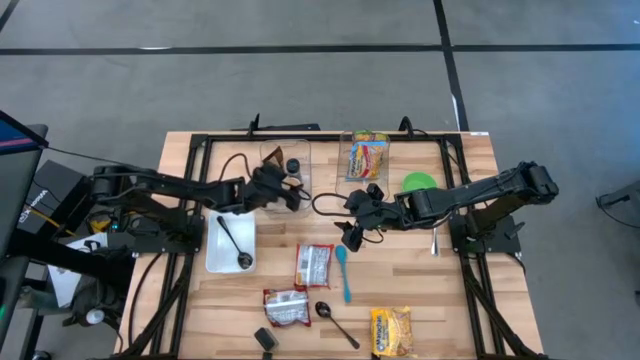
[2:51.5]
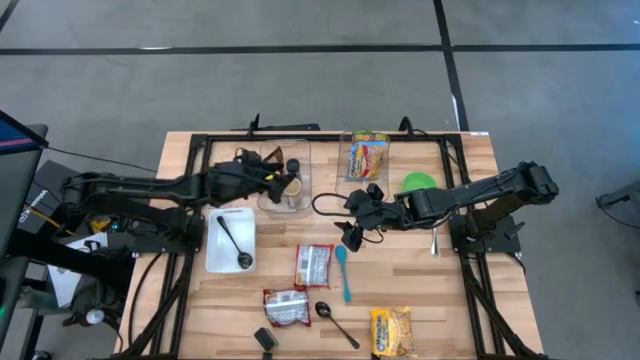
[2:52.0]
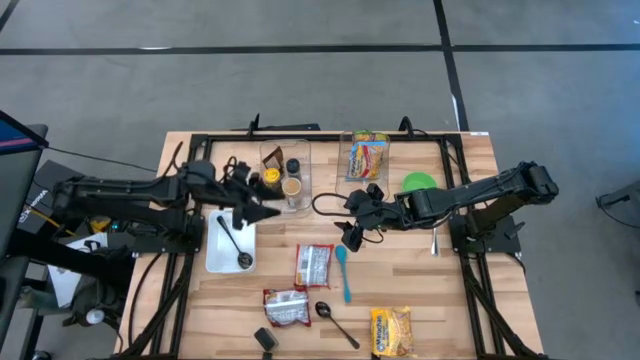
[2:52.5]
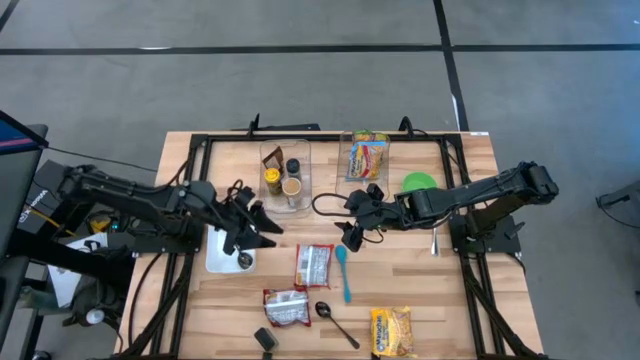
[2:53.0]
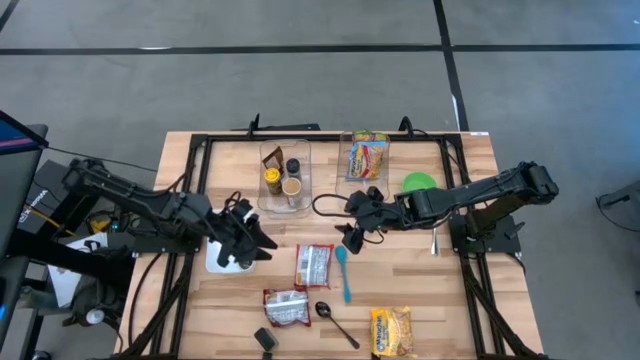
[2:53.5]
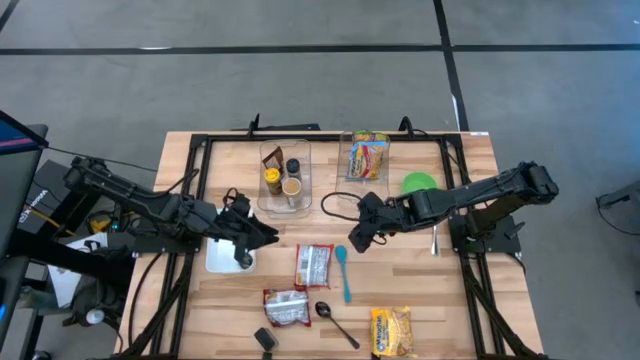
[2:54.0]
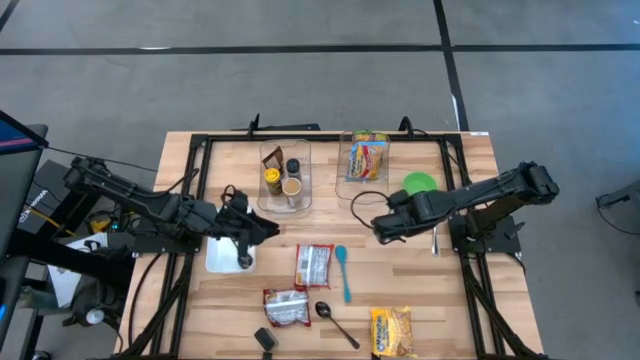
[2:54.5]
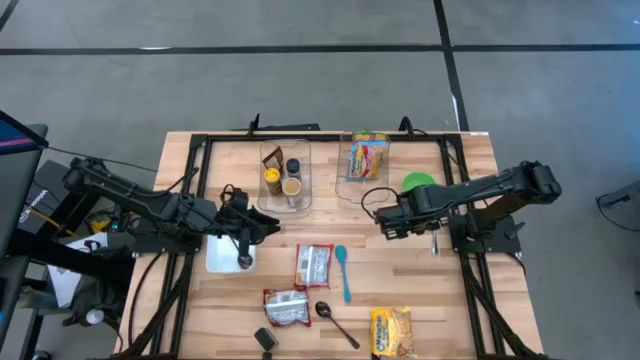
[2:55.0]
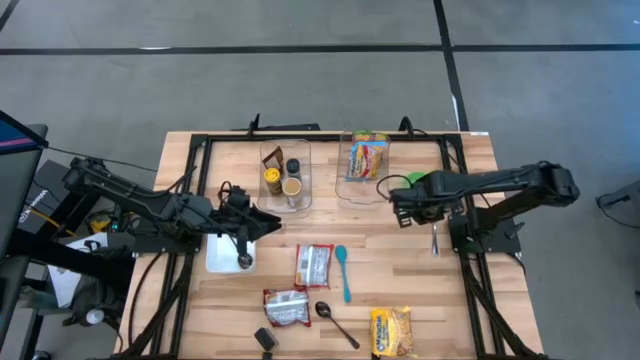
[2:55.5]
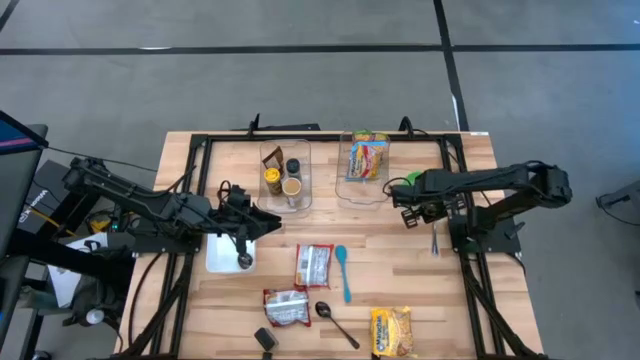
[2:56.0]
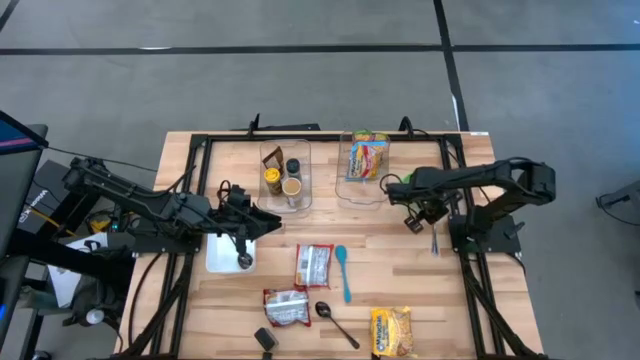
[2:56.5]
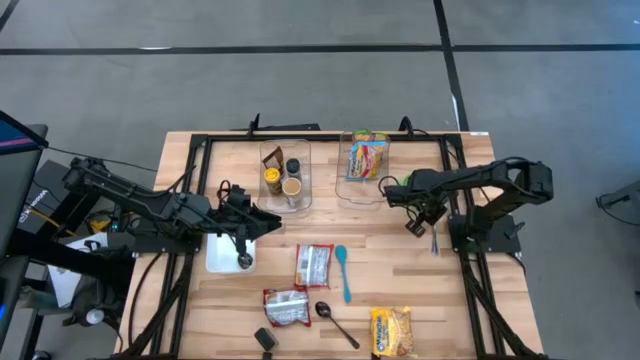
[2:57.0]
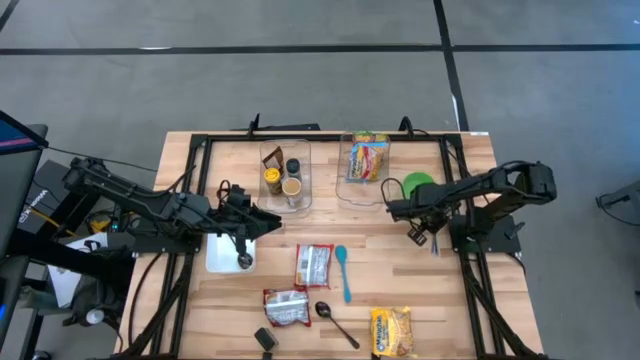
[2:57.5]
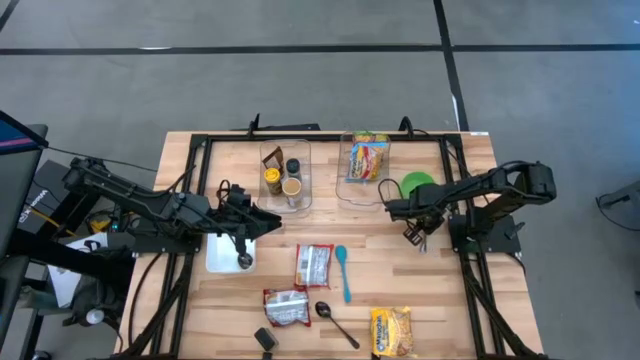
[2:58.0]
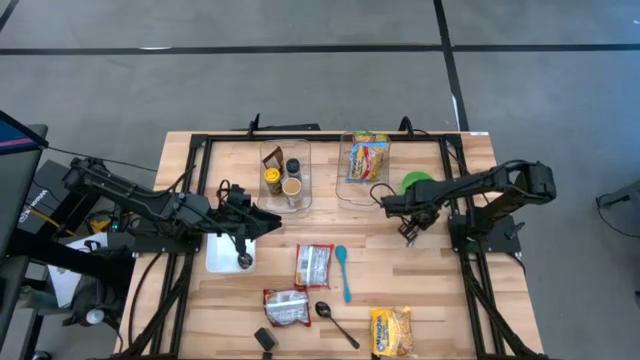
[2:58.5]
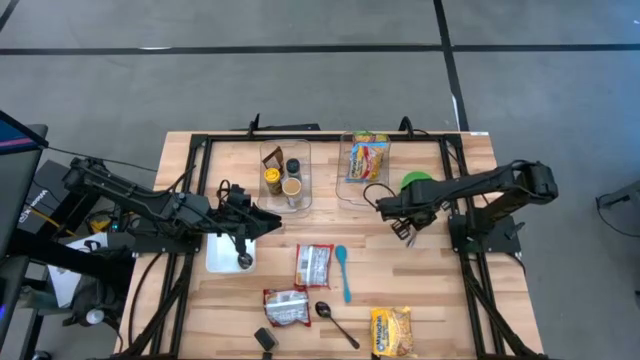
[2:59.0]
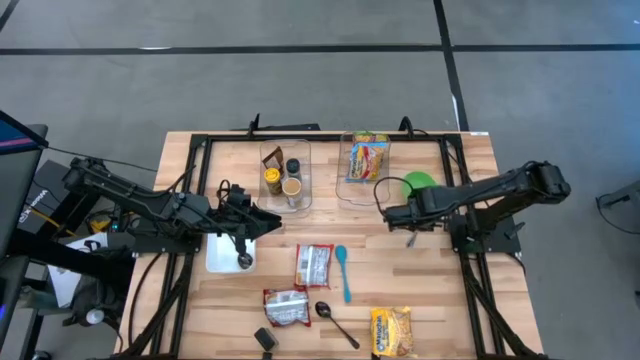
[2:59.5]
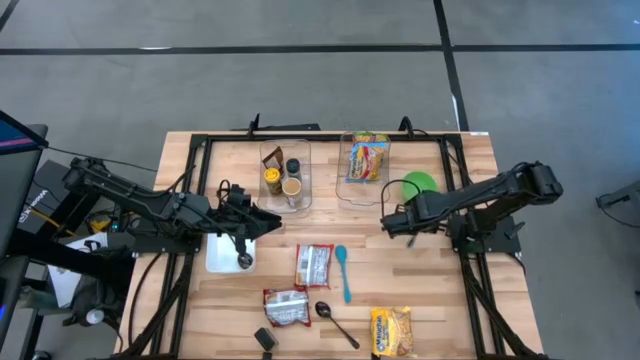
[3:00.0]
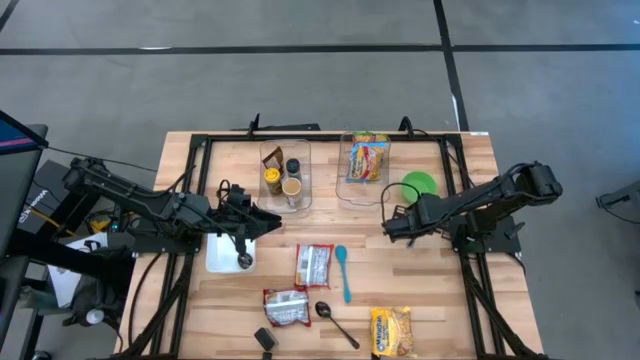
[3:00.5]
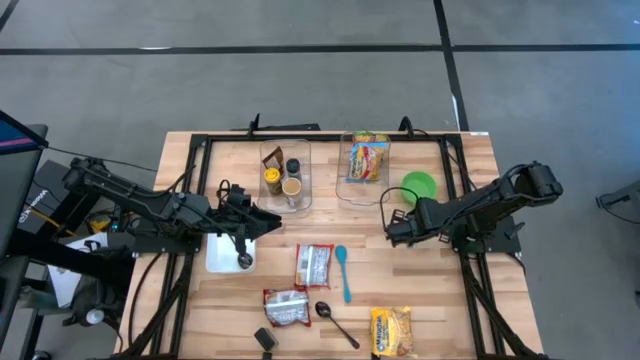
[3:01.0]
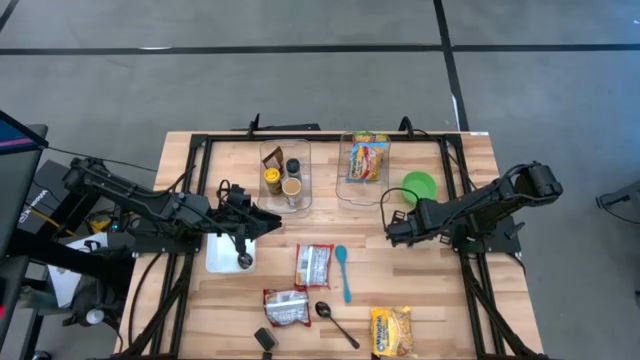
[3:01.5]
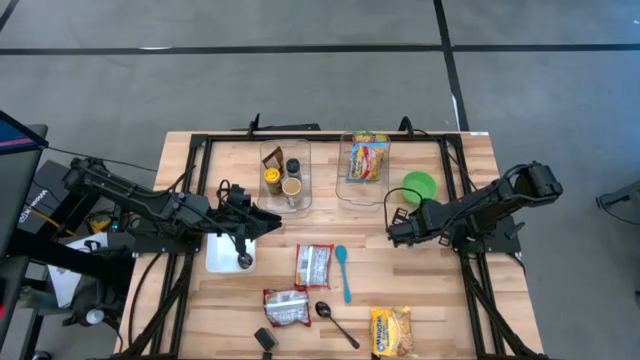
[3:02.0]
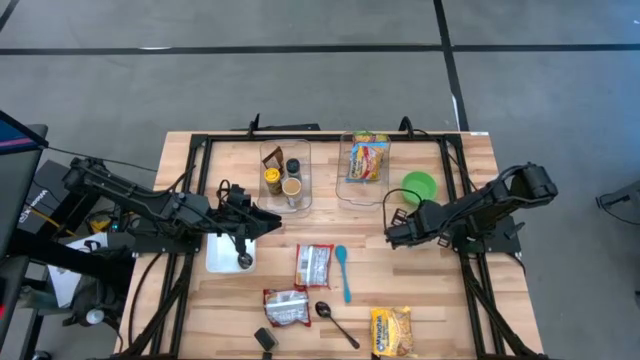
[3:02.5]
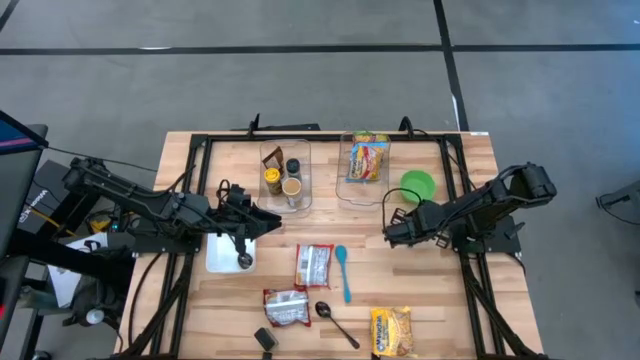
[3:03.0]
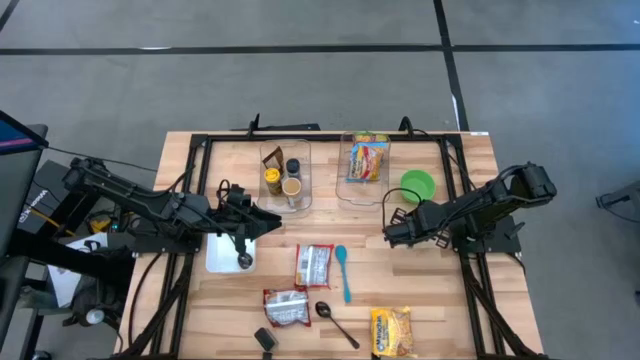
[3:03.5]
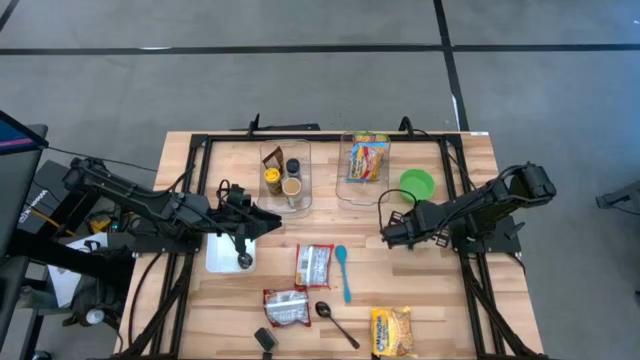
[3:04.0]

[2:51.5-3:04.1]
Task: Pick & Place Food Item
Put the silver spoon into the white bin

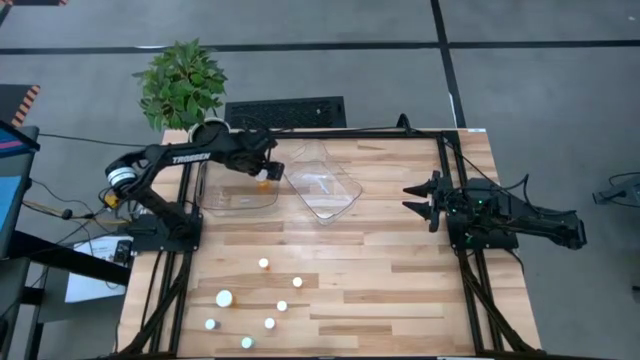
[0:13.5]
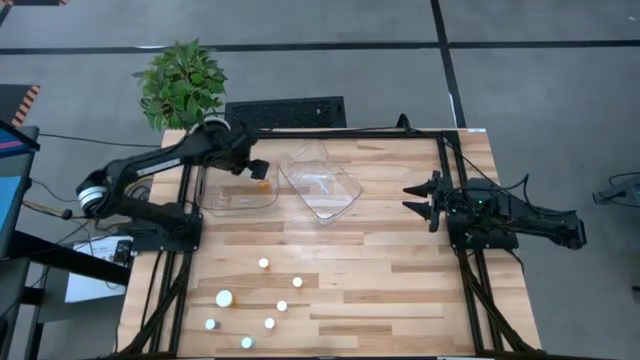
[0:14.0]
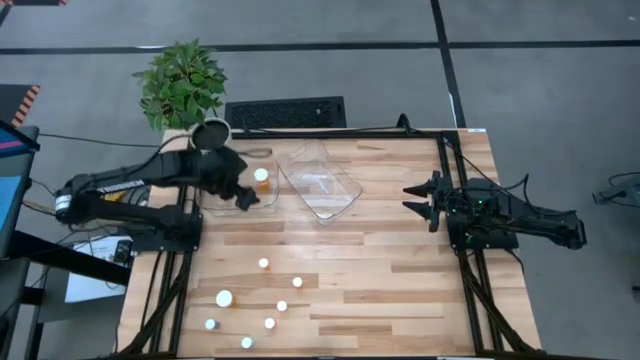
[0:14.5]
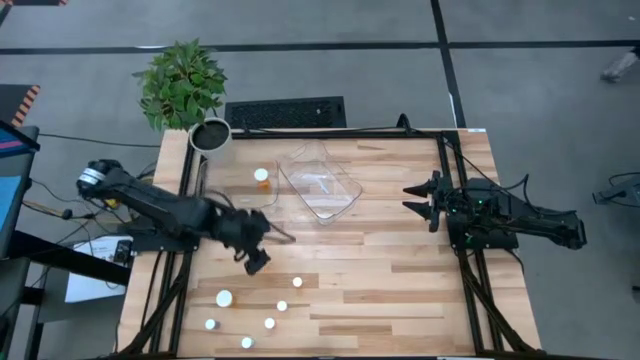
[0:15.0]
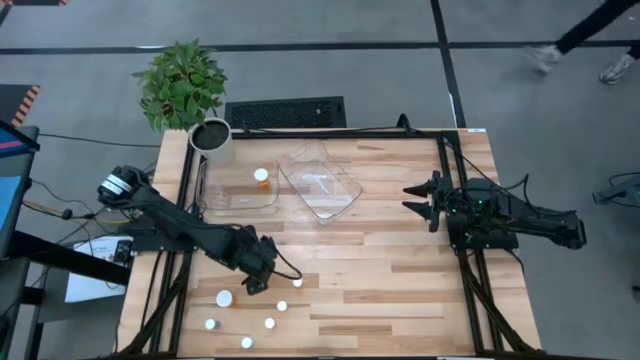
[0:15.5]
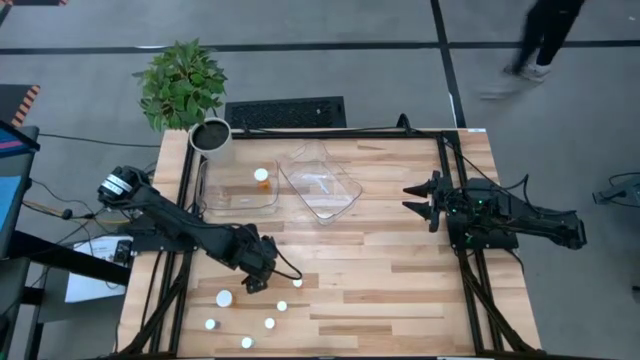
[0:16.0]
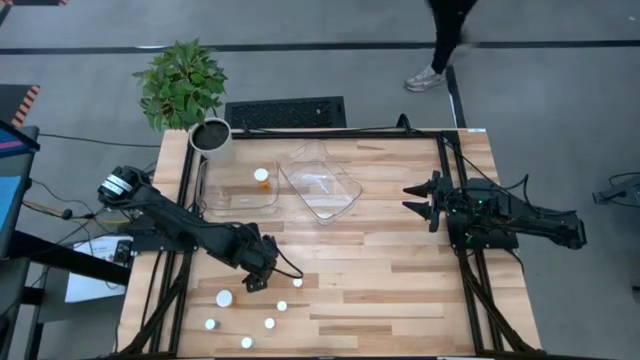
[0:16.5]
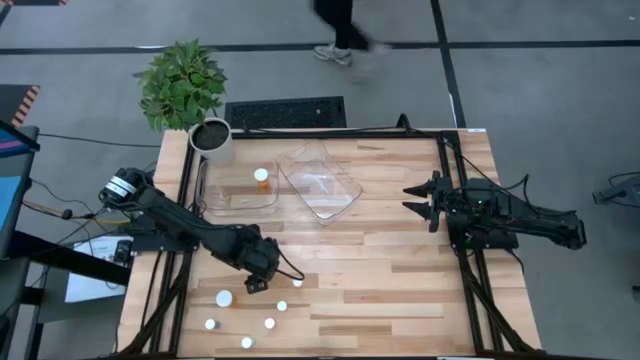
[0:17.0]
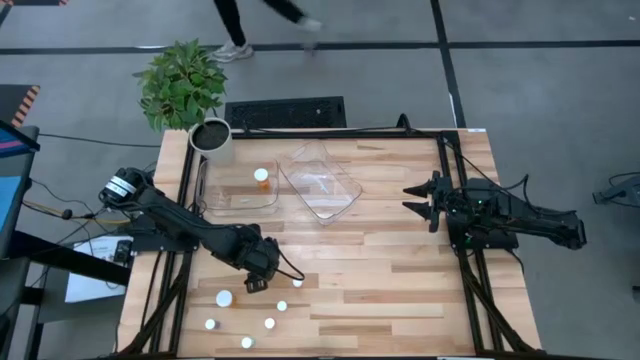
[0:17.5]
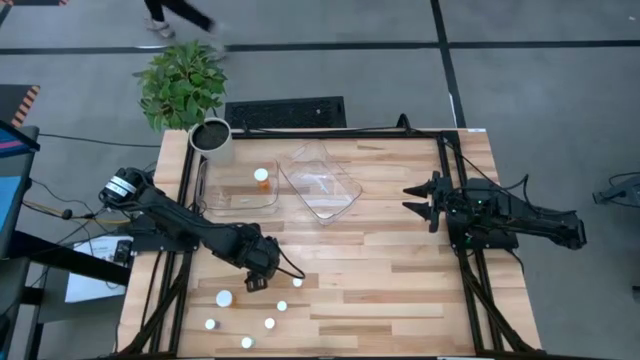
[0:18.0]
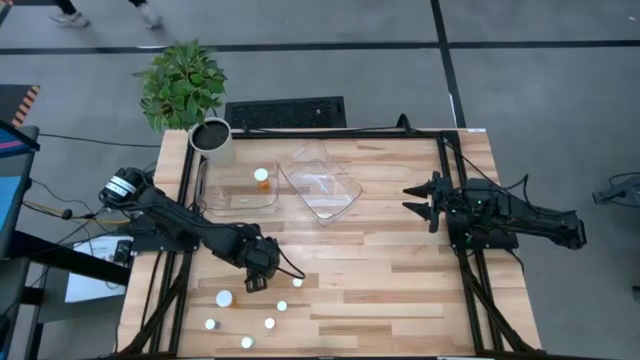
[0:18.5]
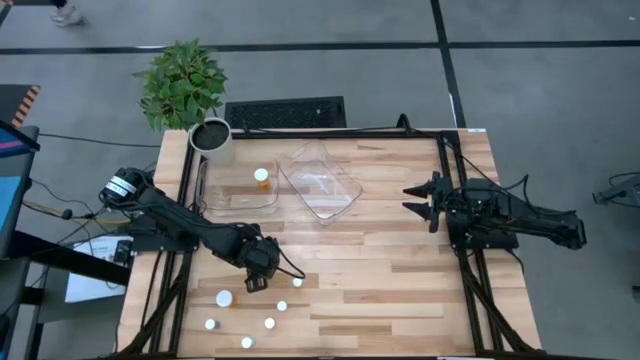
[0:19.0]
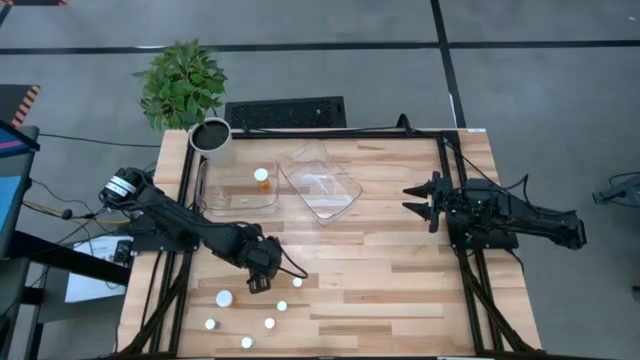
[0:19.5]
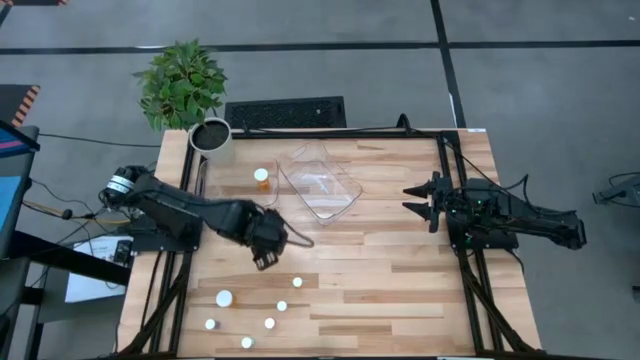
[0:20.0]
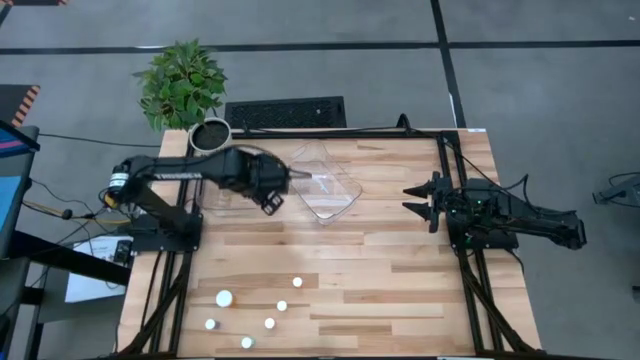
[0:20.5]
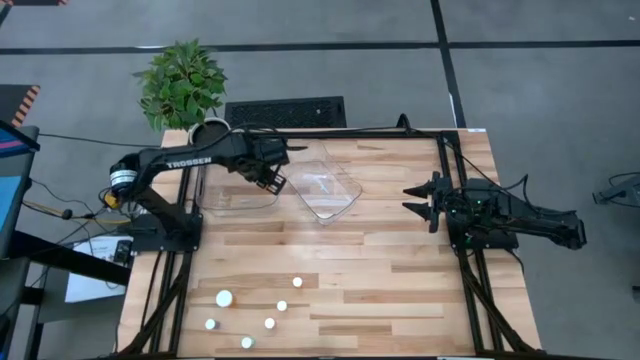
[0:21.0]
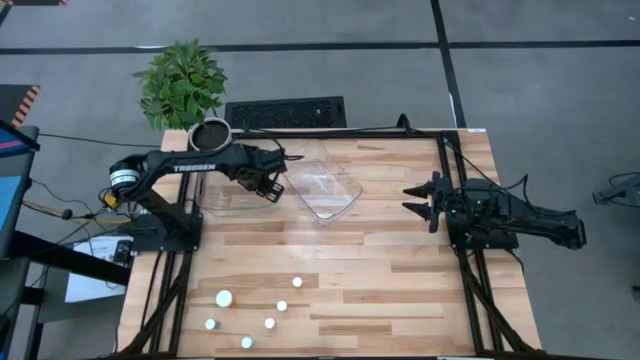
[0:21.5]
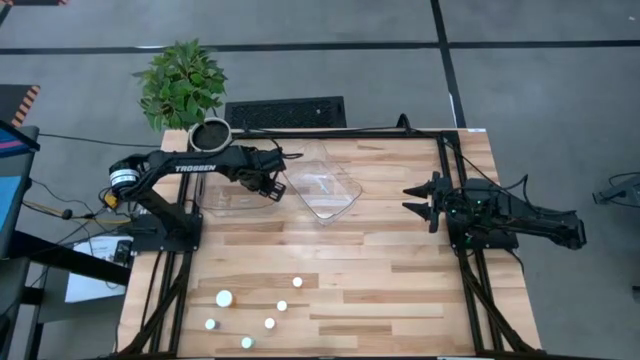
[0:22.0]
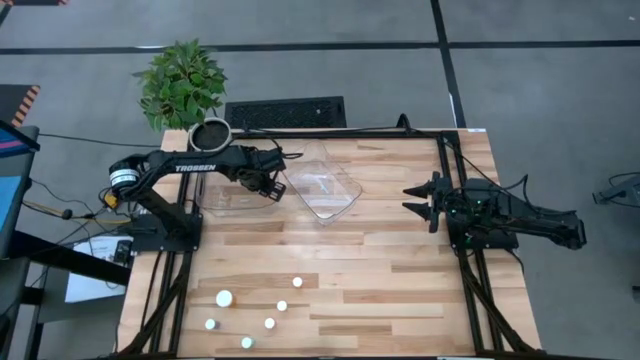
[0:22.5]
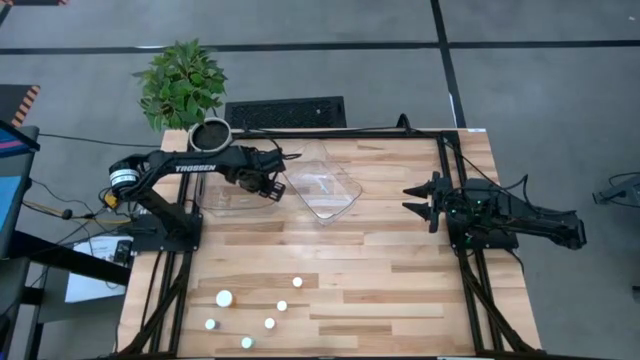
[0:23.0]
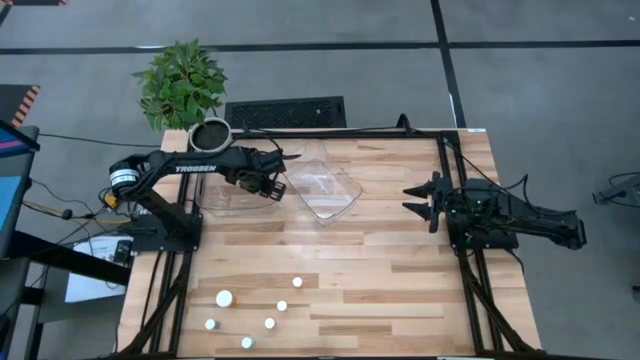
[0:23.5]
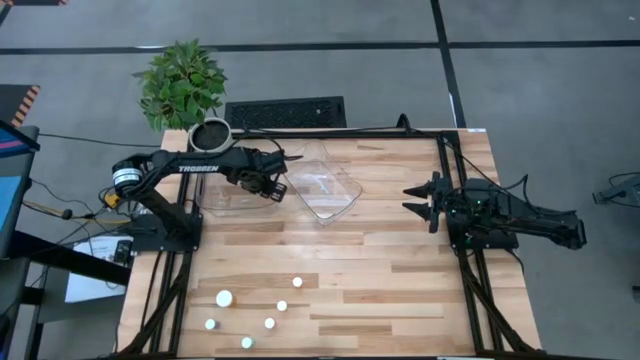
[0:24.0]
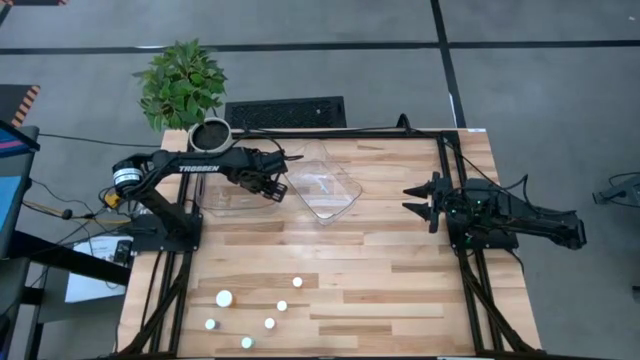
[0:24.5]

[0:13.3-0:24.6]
Task: Pick and place medicine bottles into bin by pill shape (circle, oval)
Put the top small orange capsule bottle into the left transparent bin
